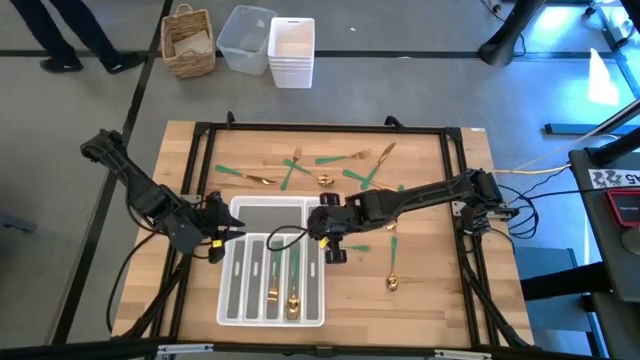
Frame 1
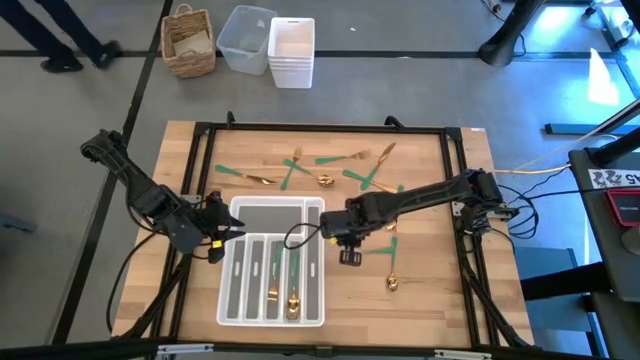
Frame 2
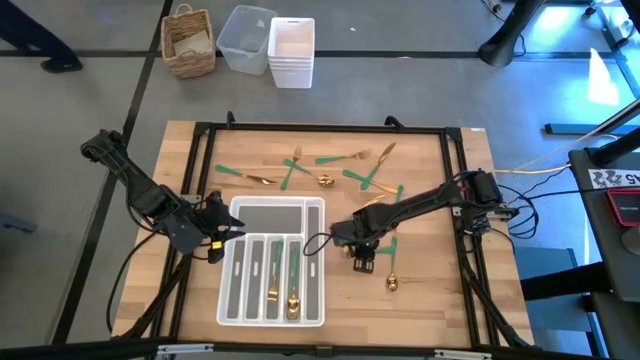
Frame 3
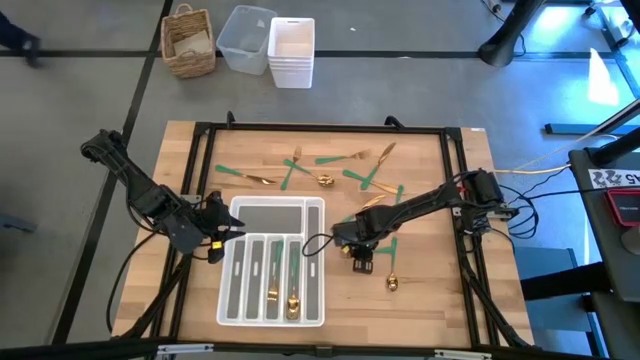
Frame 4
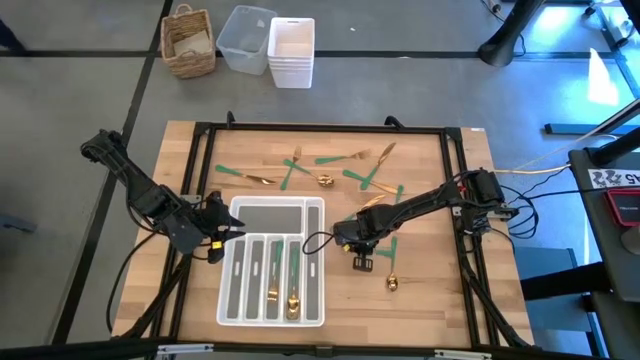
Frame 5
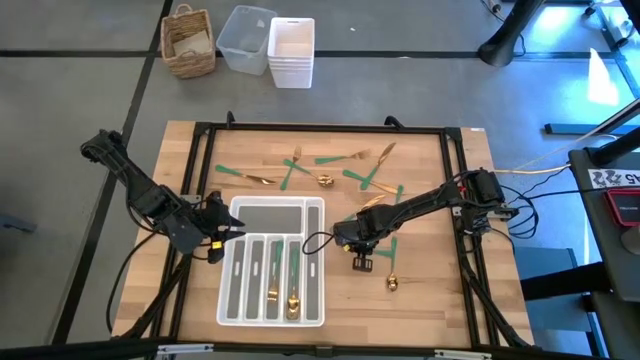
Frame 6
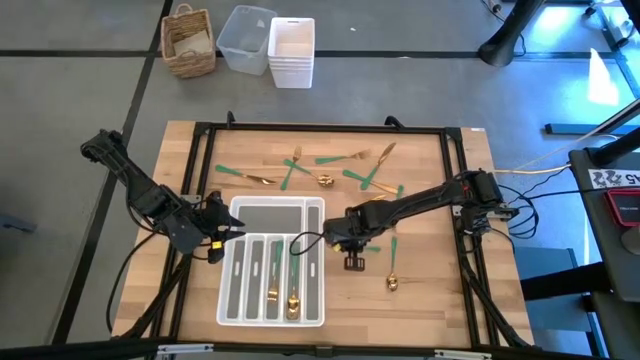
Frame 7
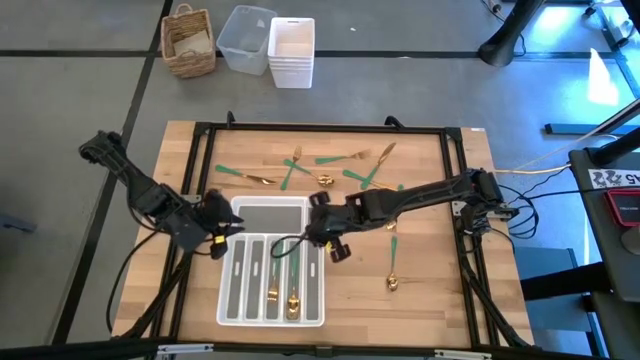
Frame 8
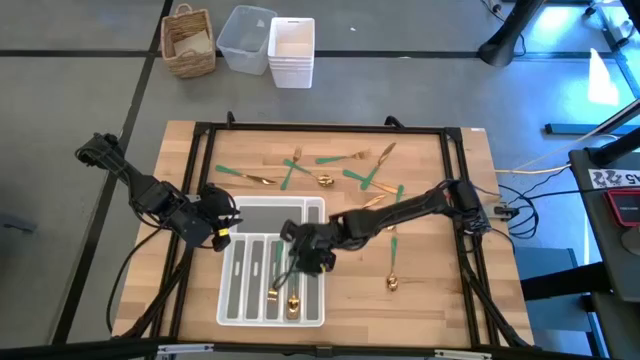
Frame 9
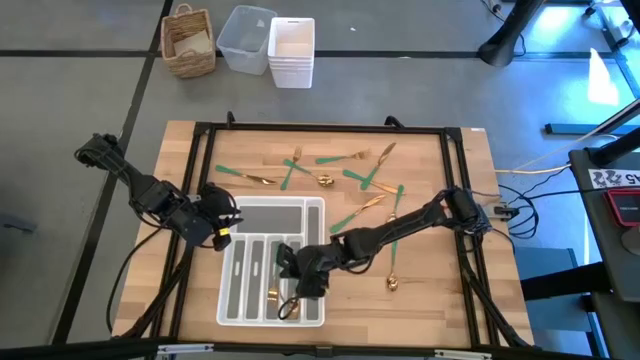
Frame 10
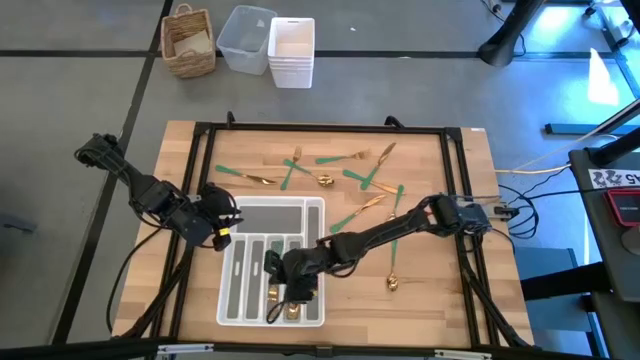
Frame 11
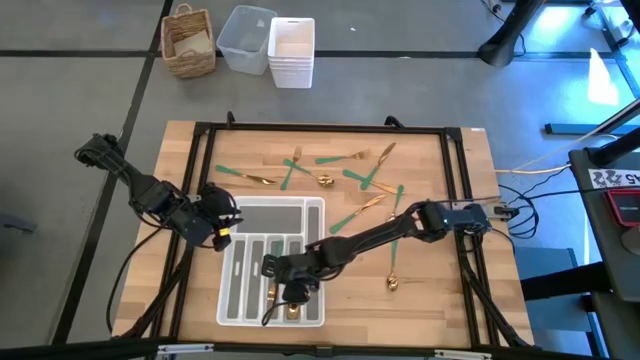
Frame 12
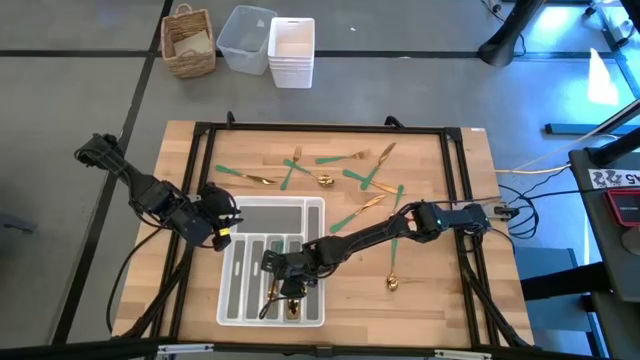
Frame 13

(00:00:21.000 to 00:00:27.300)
Task: Sort silverware
Put the fork in the silverware tray

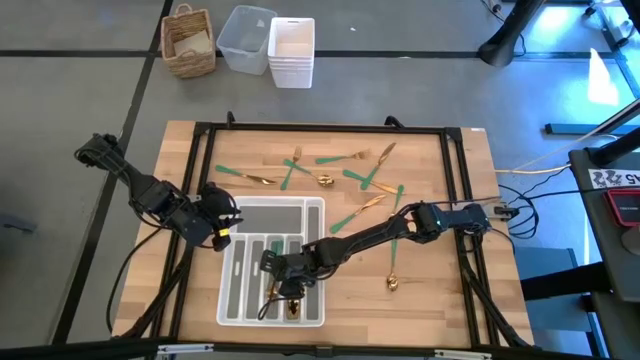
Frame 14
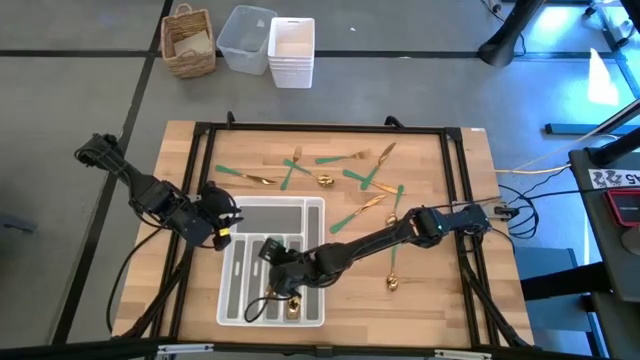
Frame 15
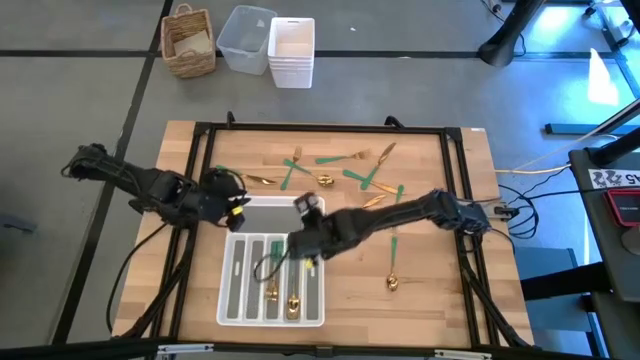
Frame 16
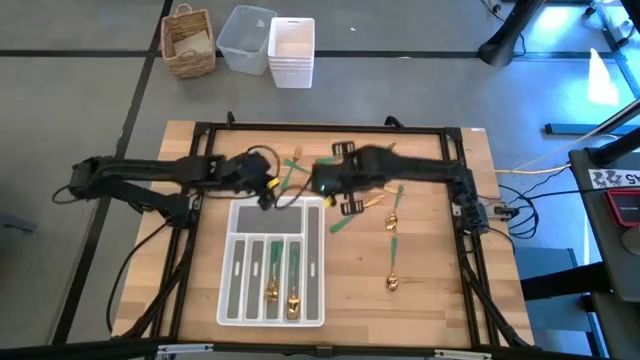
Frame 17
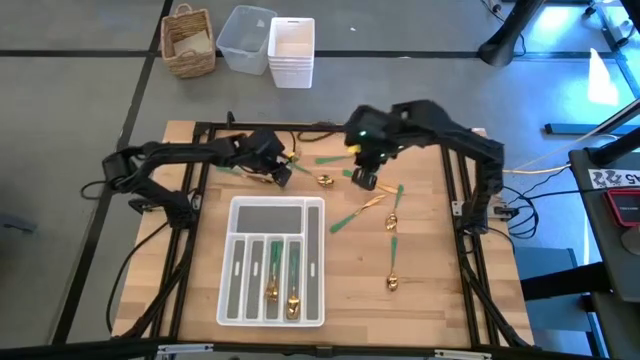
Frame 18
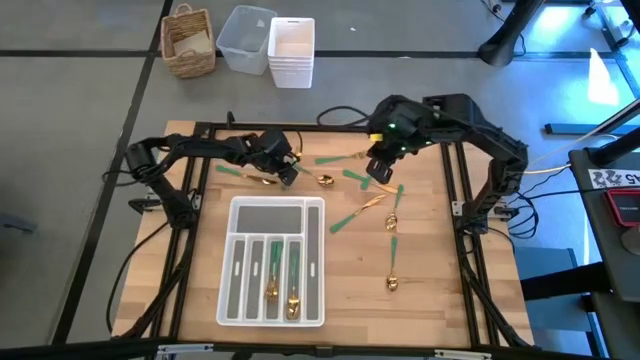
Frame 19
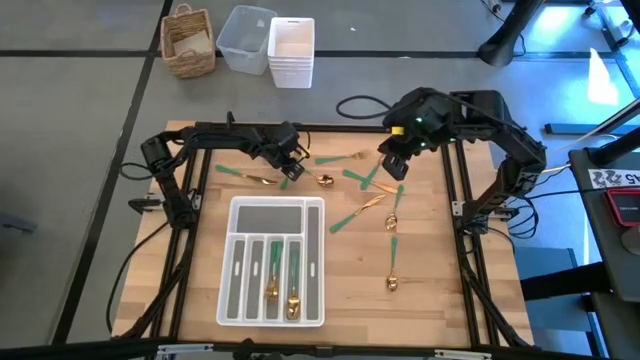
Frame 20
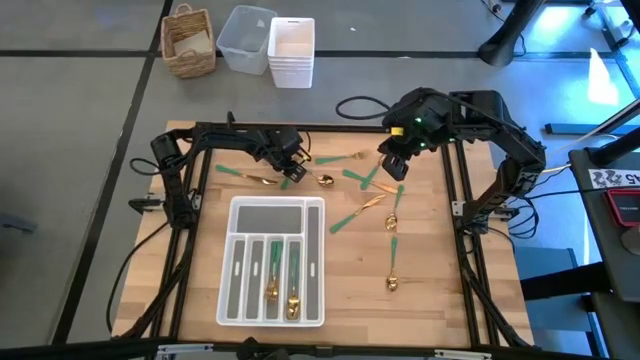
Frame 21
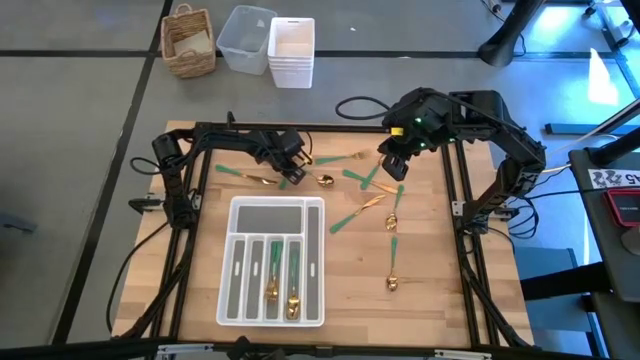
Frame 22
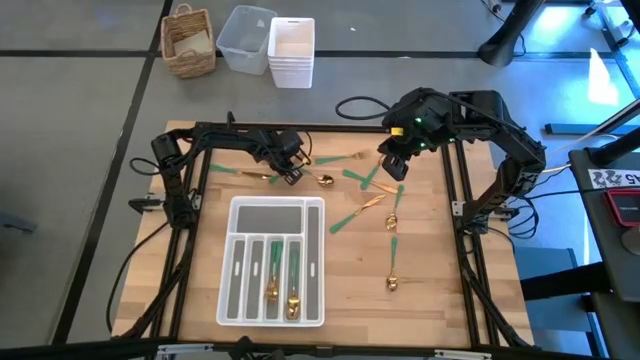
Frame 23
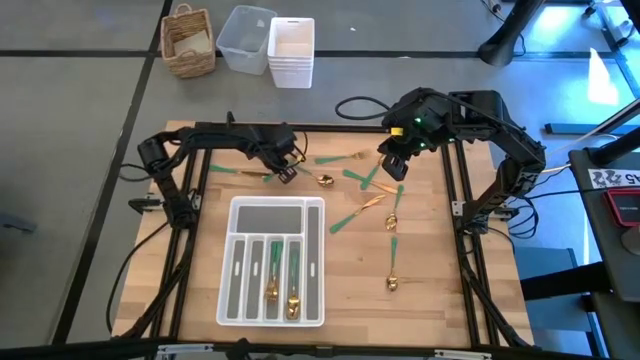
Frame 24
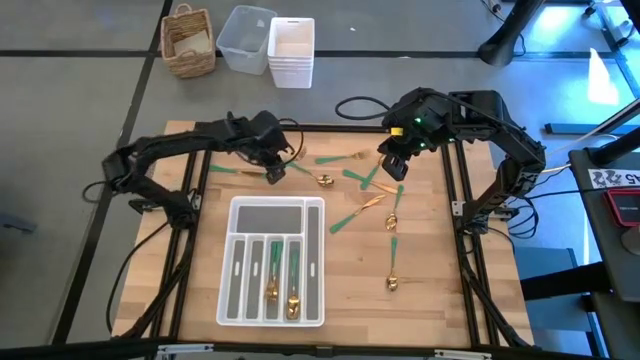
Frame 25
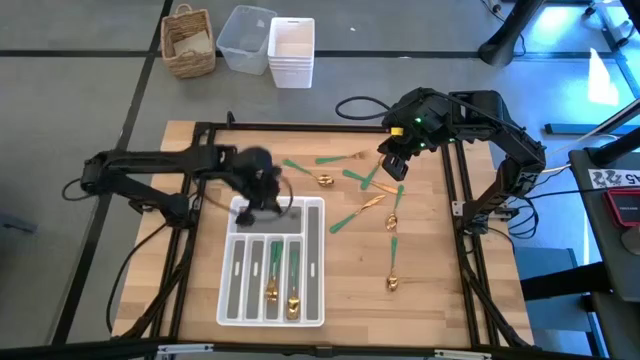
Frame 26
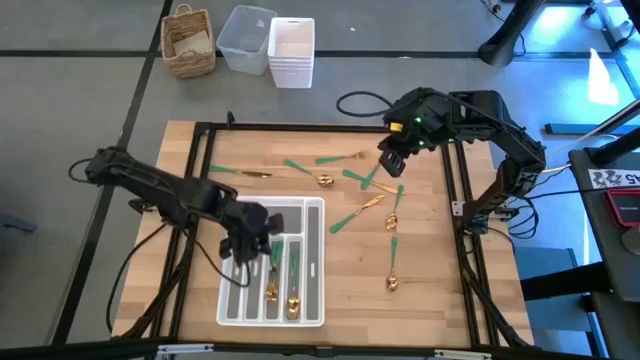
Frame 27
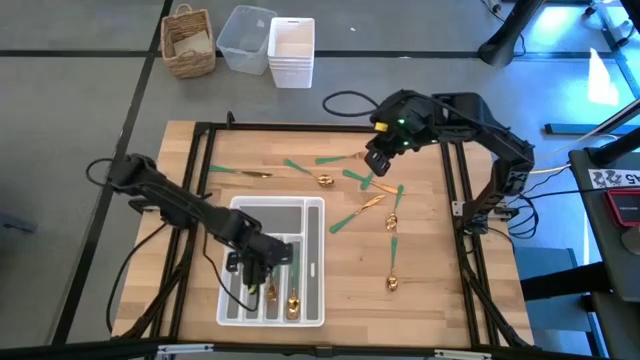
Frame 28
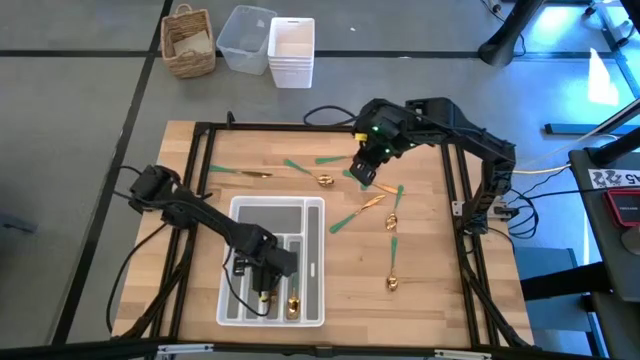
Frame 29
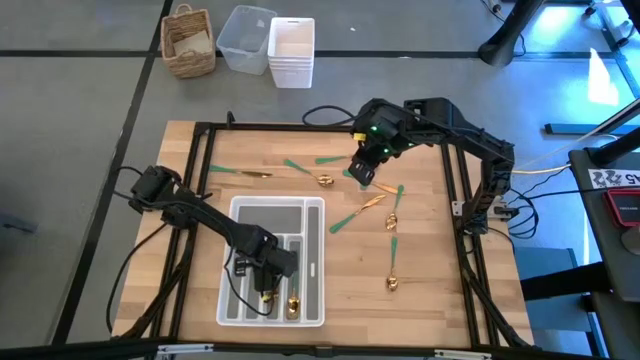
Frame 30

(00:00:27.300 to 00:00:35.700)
Put the fork in the silverware tray

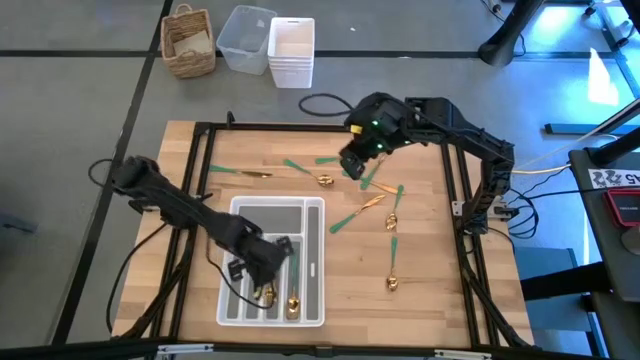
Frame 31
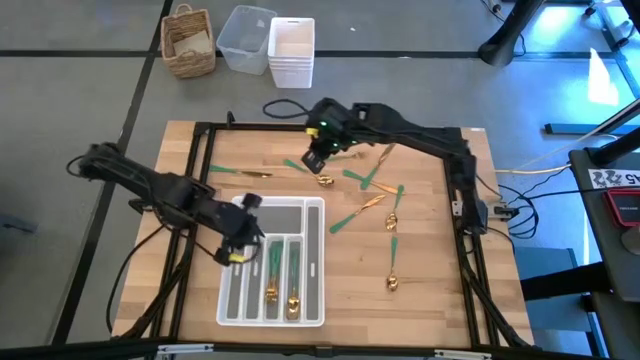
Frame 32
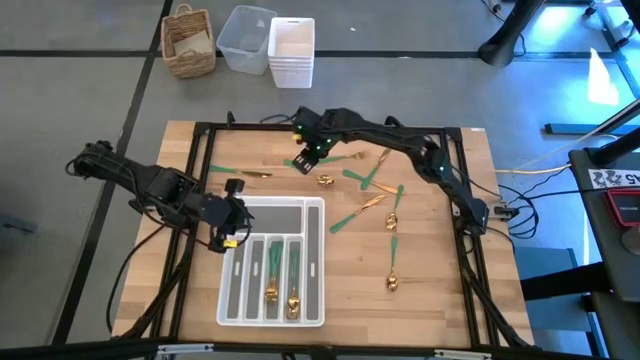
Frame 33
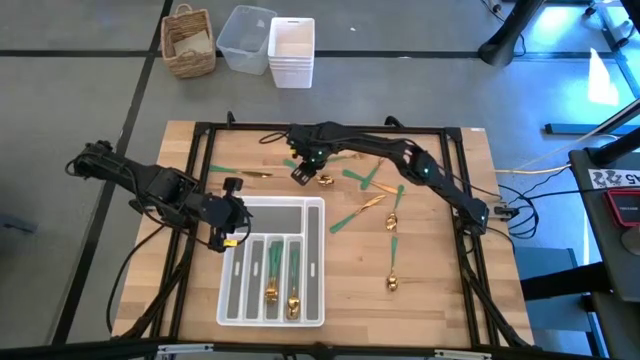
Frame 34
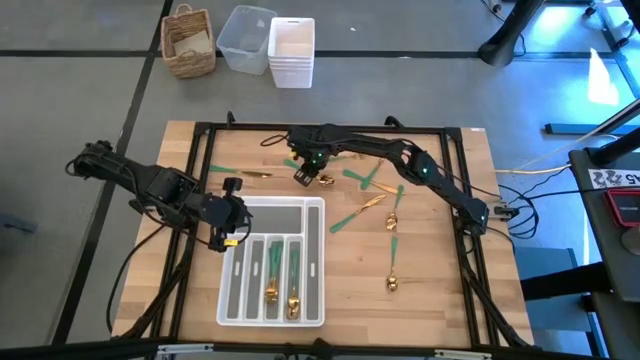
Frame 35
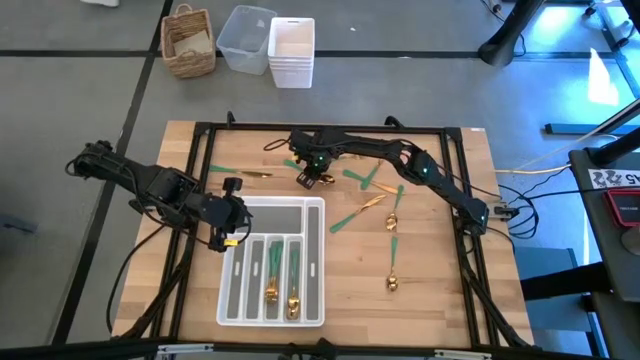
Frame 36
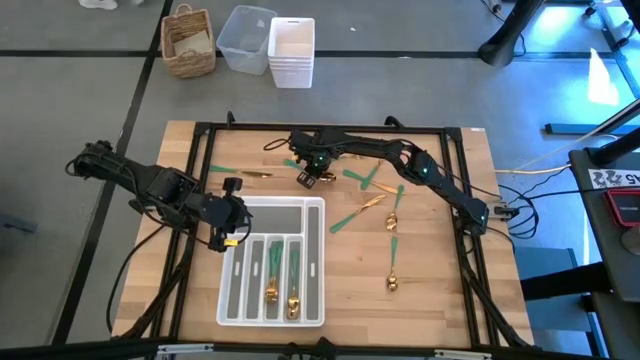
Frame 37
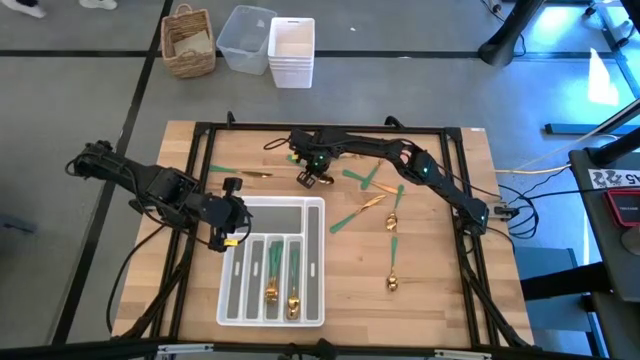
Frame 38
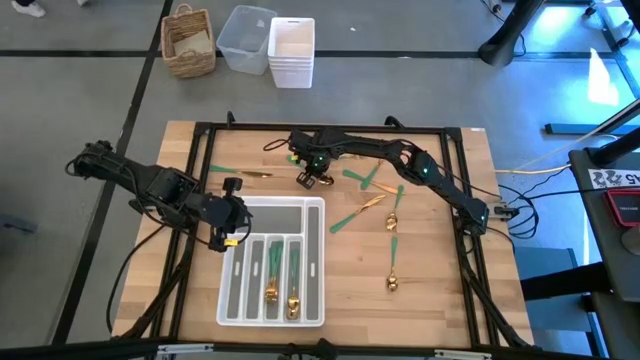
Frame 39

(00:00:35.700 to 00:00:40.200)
Put the spoon in the silverware tray

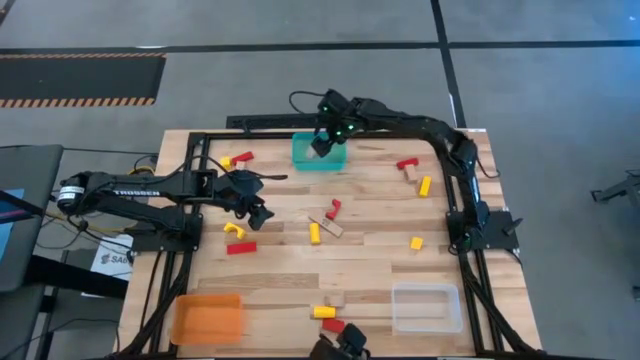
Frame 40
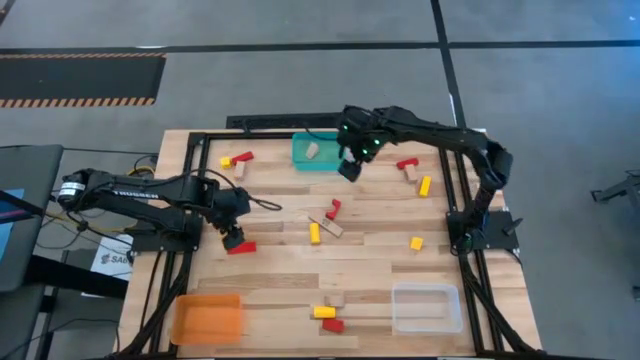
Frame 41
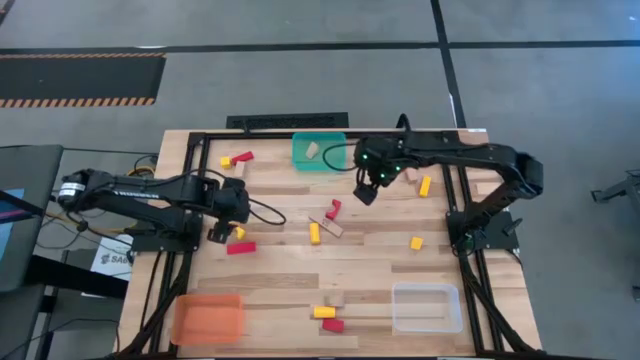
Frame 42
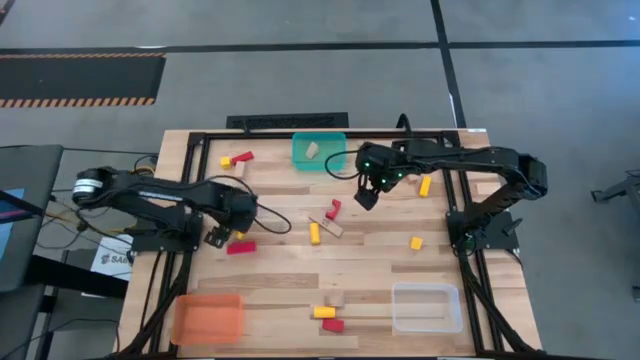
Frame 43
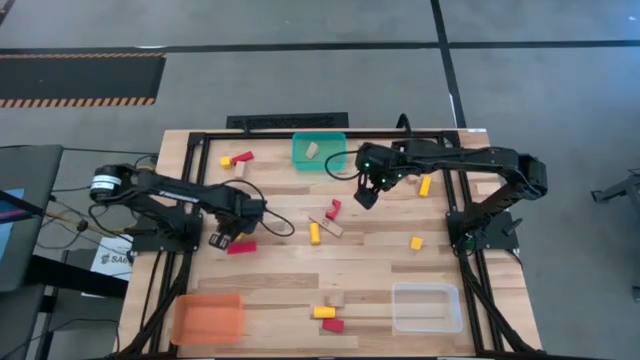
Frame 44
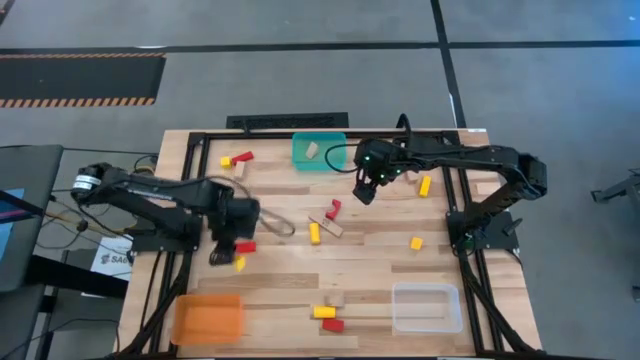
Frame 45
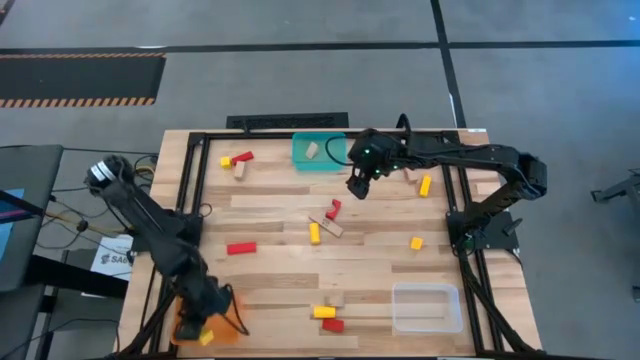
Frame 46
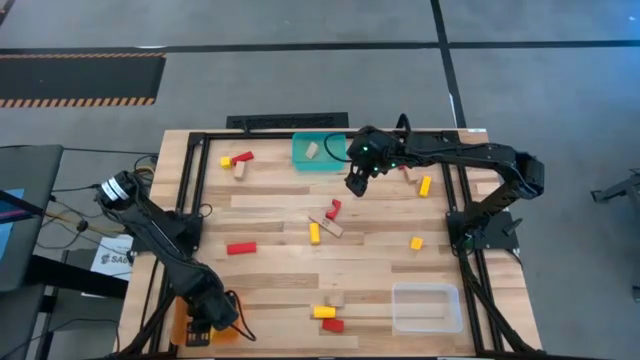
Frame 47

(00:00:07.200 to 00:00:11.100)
Task: Sort & place blocks by color
Put the yellow block into the orange bin
